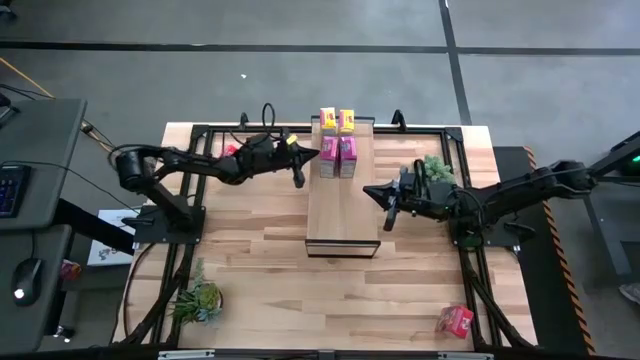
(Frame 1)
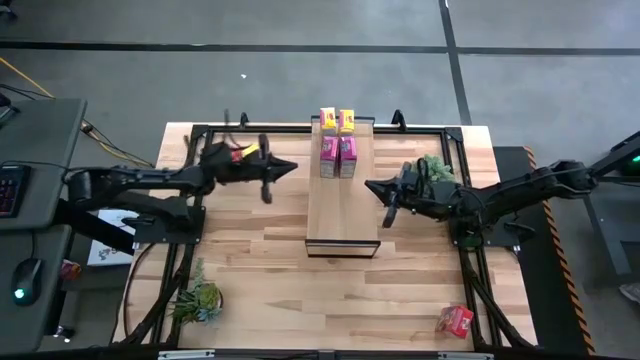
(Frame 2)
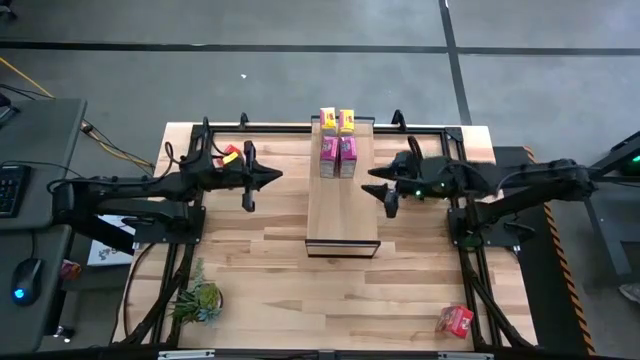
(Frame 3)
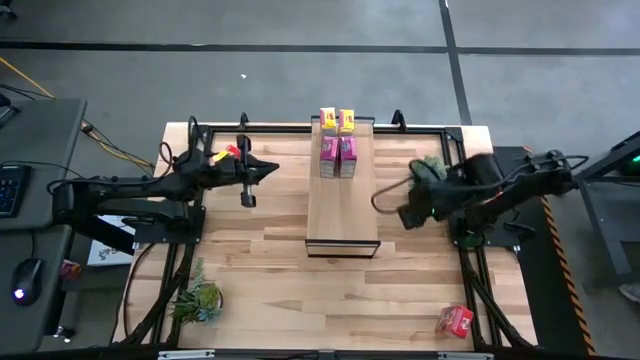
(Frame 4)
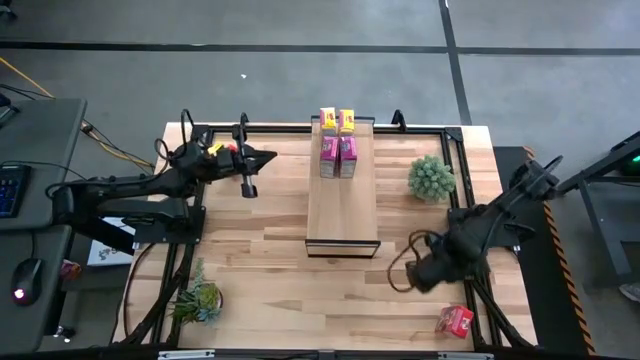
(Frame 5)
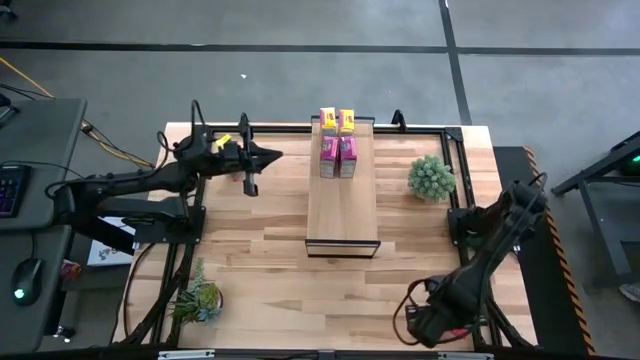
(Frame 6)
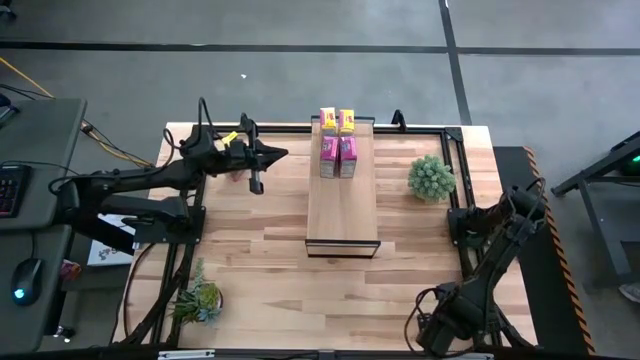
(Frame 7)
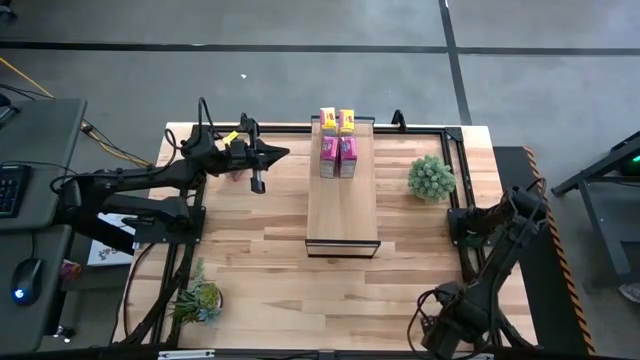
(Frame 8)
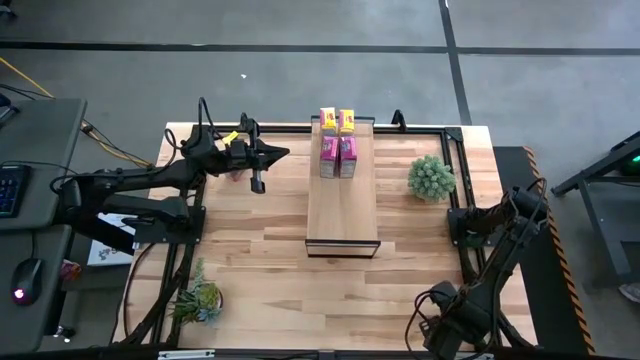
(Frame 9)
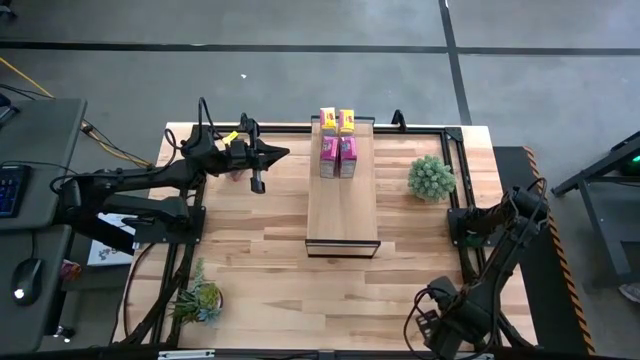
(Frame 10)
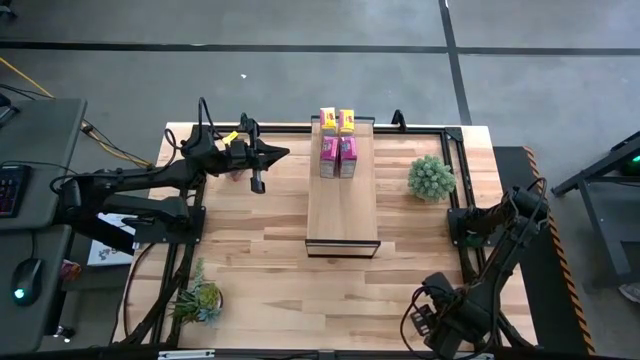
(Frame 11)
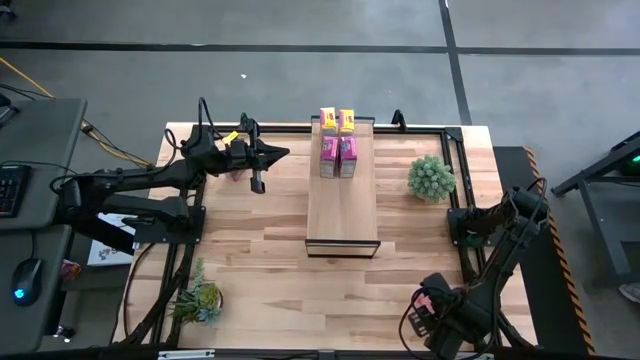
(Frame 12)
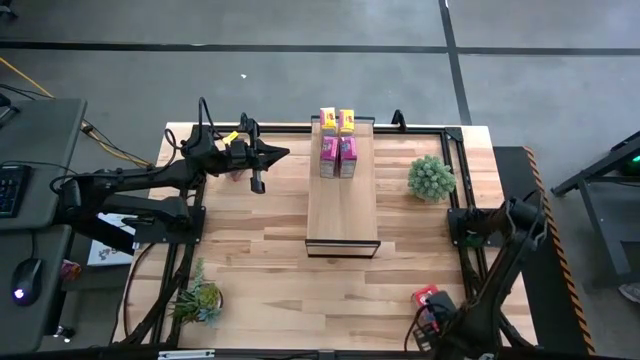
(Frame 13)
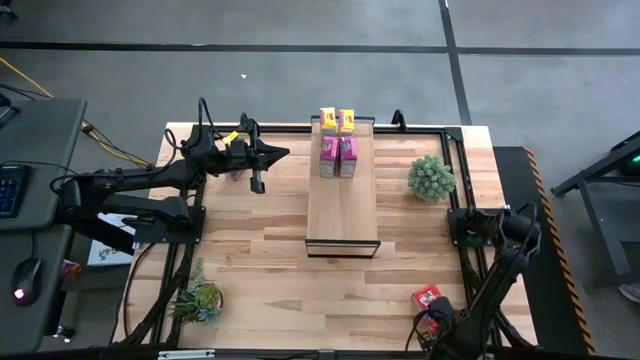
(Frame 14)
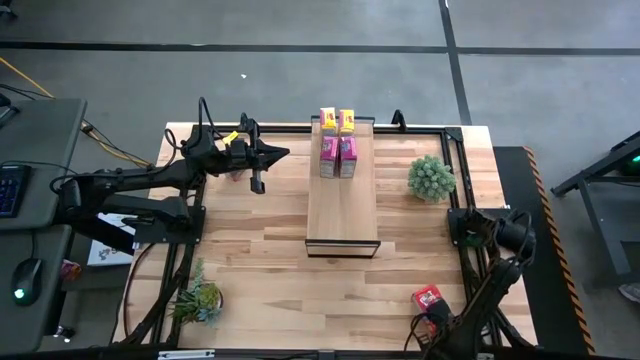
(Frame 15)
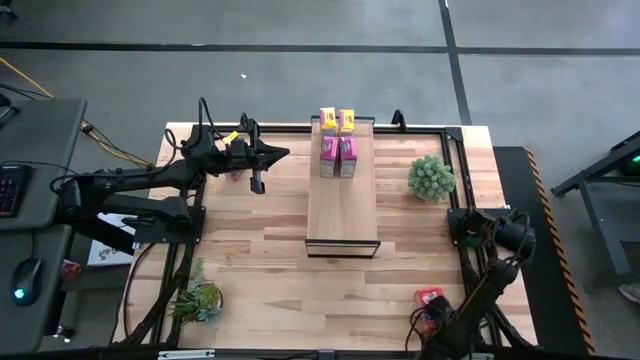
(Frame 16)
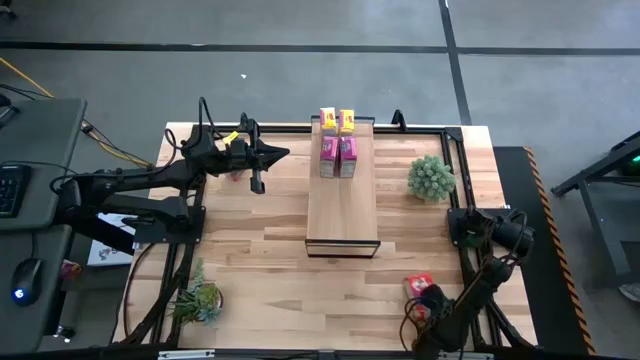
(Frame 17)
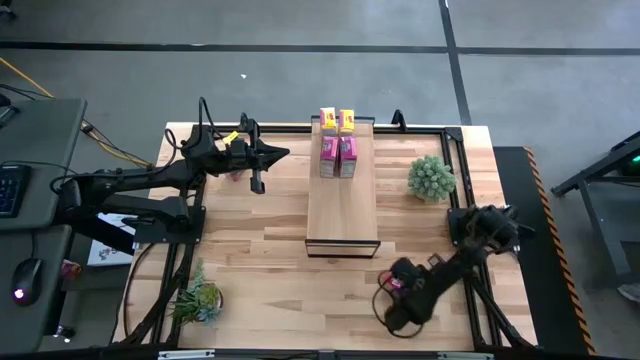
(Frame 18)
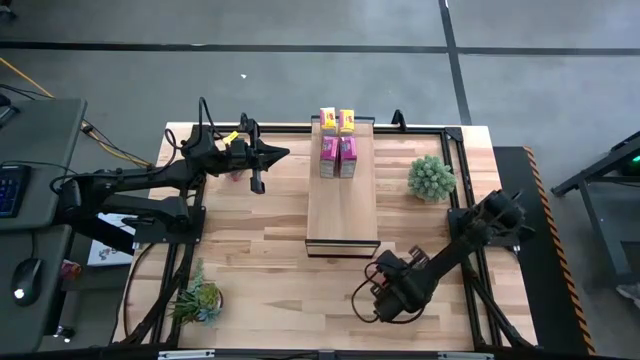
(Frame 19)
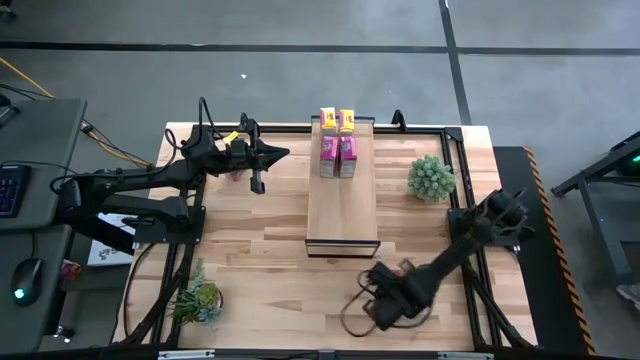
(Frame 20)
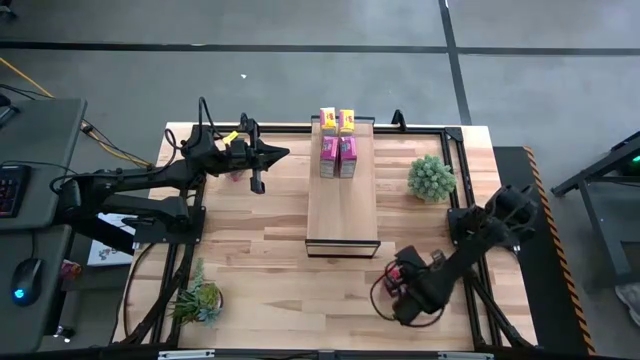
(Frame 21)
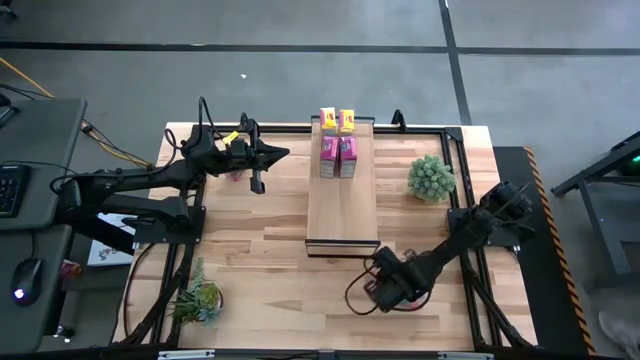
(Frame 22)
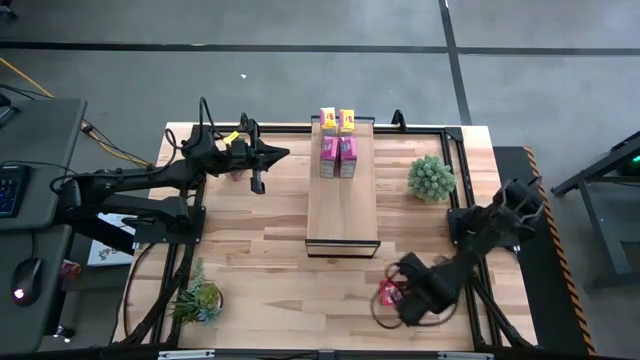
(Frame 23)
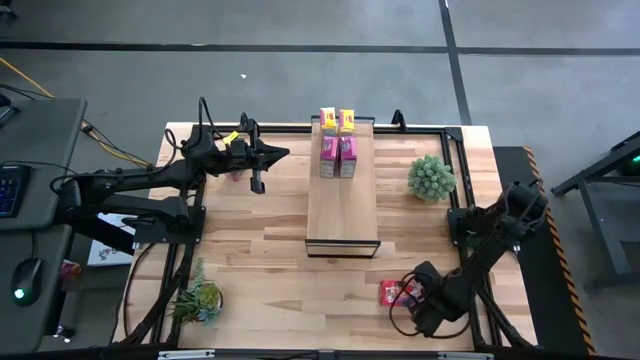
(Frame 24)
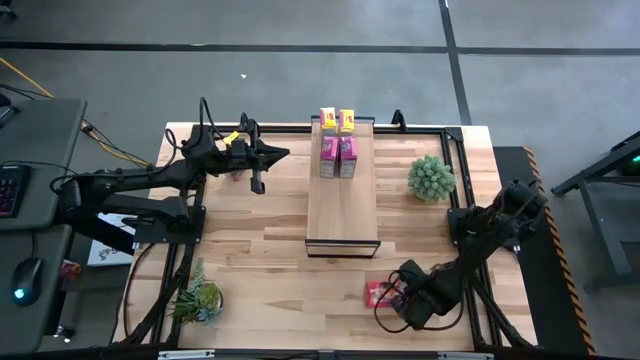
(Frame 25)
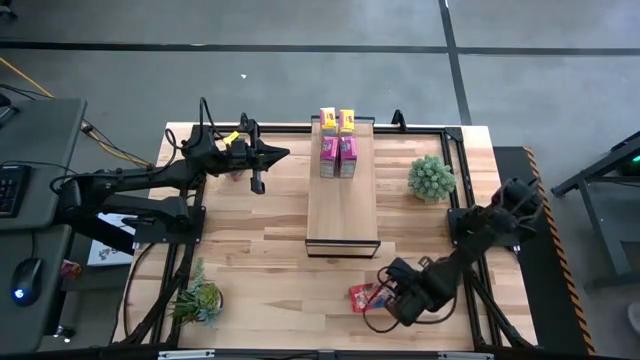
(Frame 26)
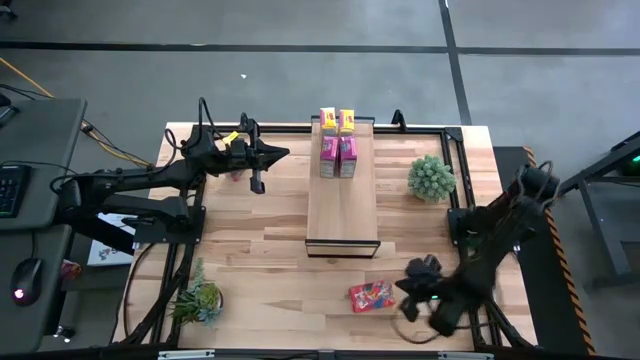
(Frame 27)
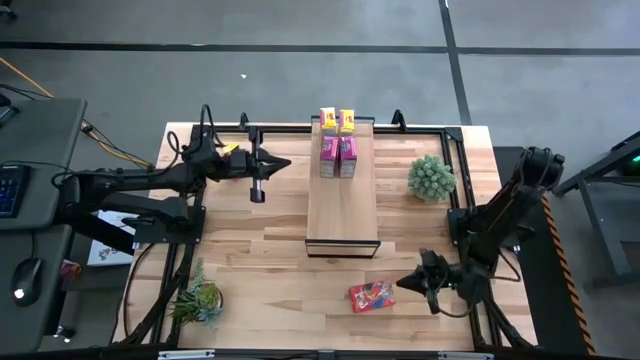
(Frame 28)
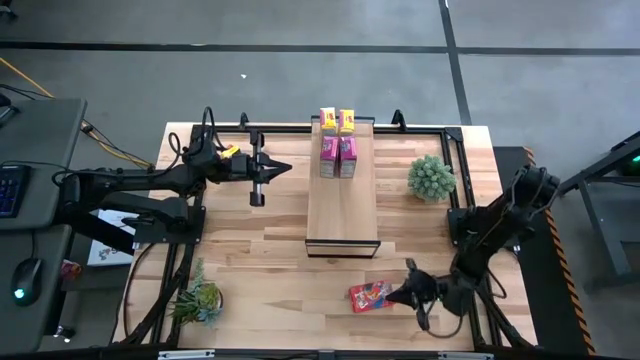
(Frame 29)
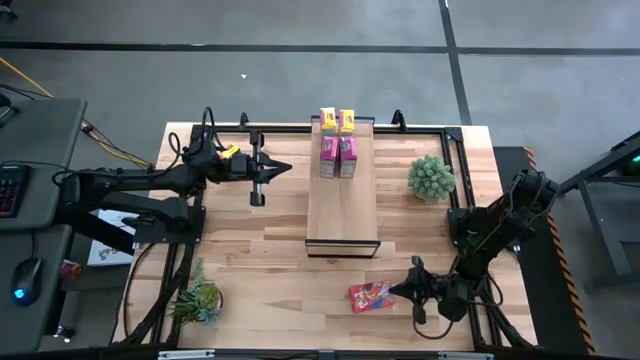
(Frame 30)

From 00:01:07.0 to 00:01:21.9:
Task: Stack cereal on shelf
Put the bottom red cereal box on the shelf

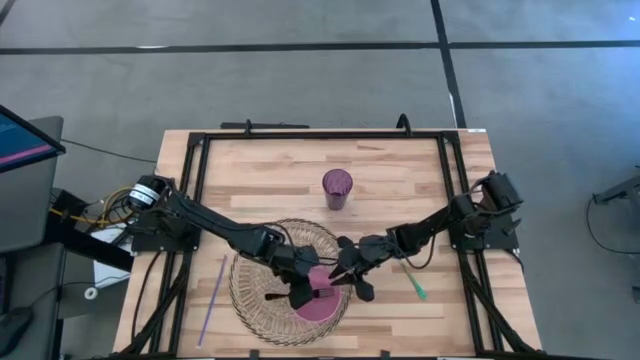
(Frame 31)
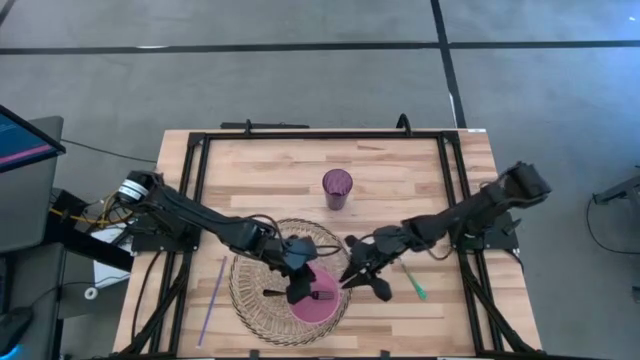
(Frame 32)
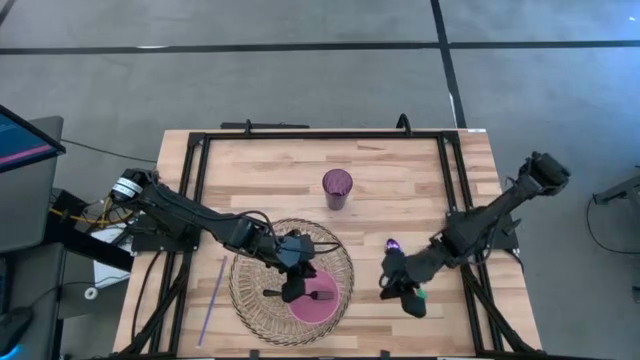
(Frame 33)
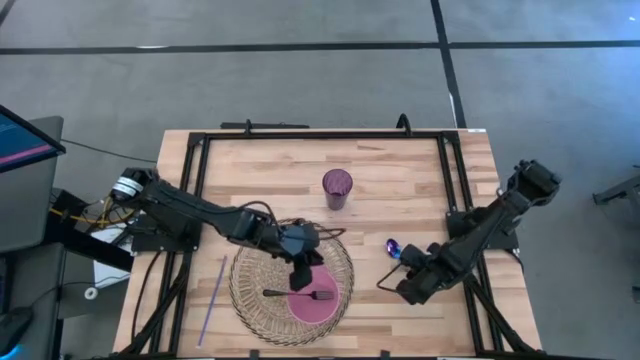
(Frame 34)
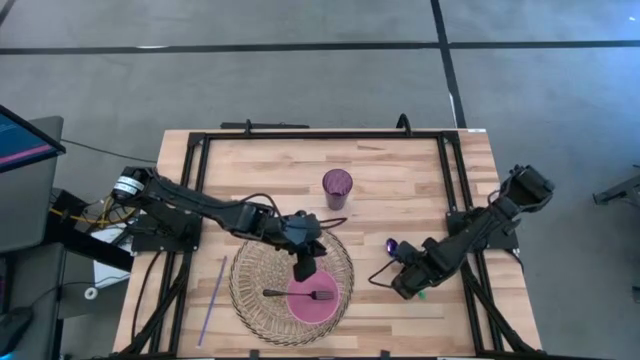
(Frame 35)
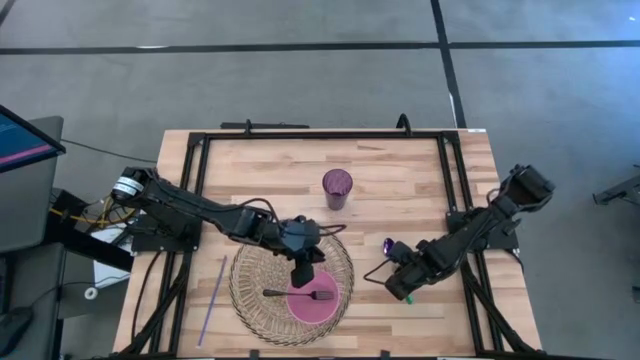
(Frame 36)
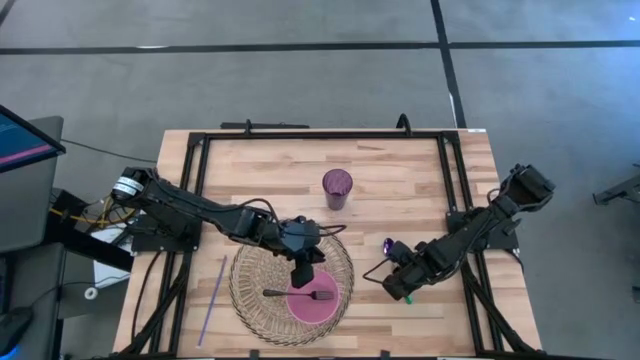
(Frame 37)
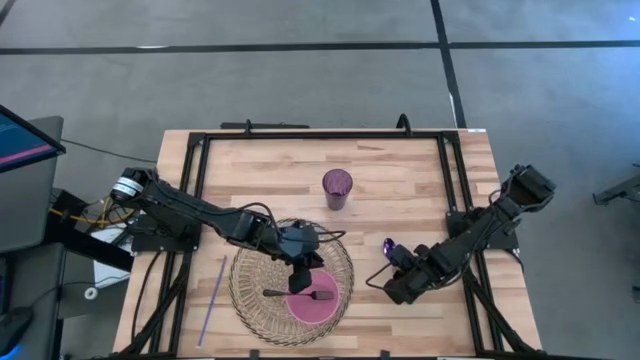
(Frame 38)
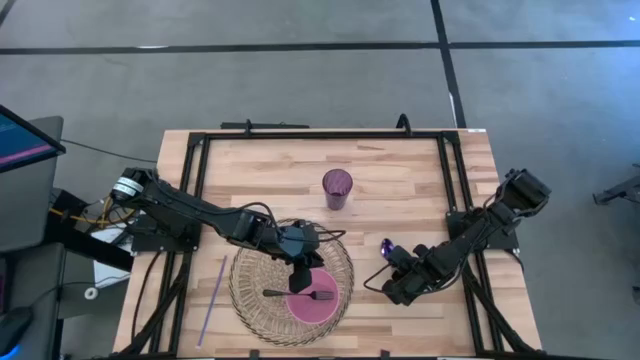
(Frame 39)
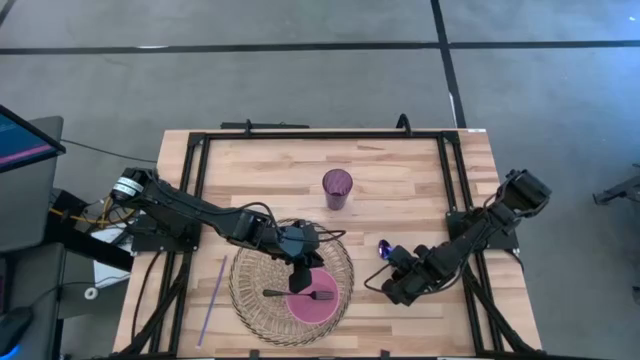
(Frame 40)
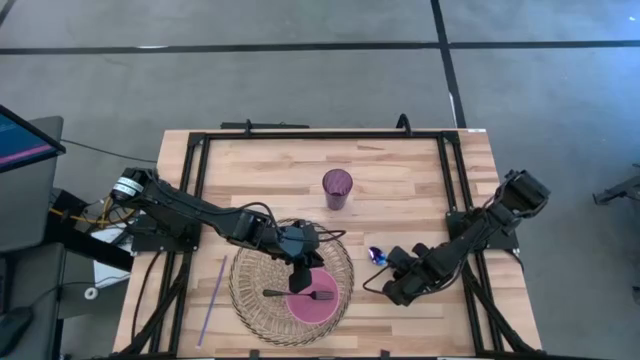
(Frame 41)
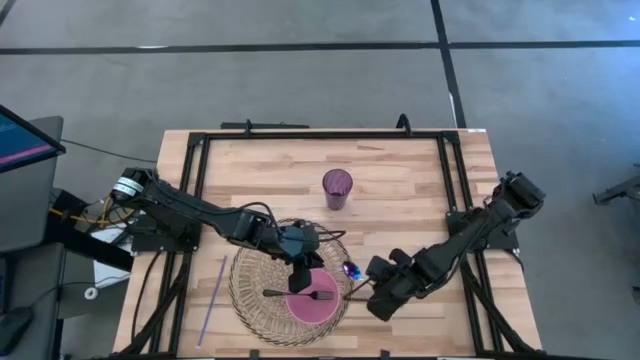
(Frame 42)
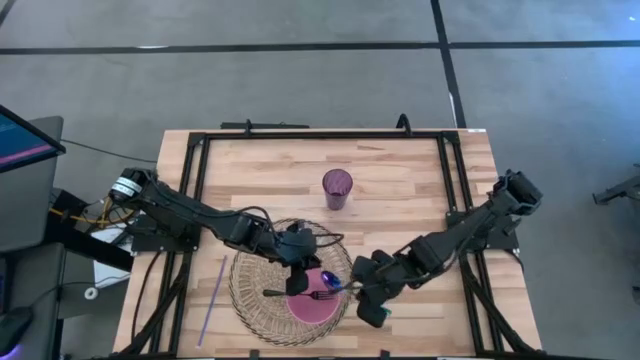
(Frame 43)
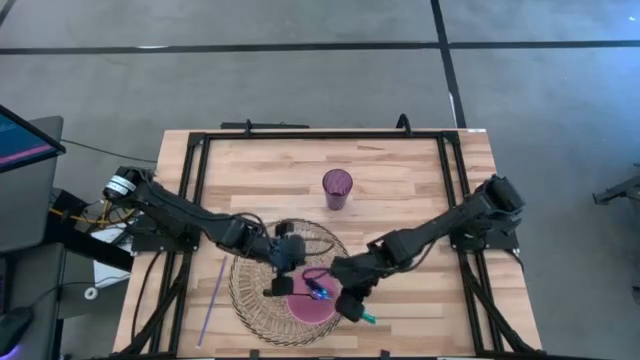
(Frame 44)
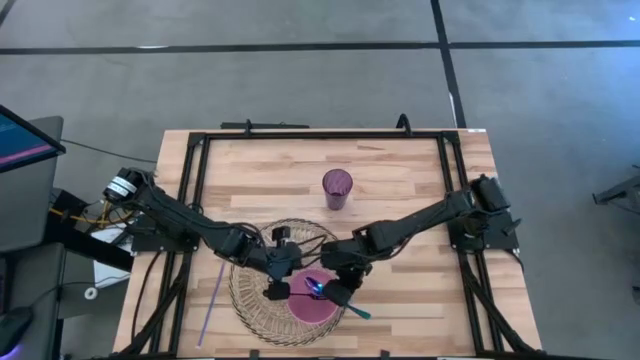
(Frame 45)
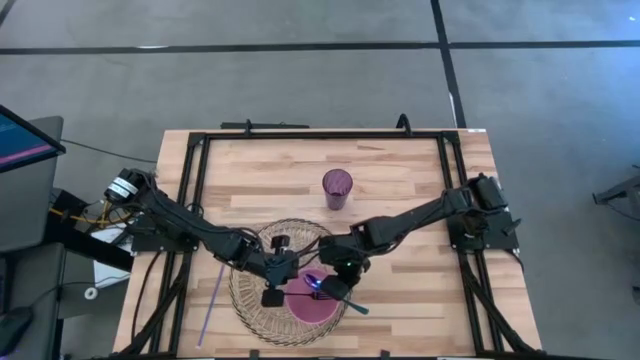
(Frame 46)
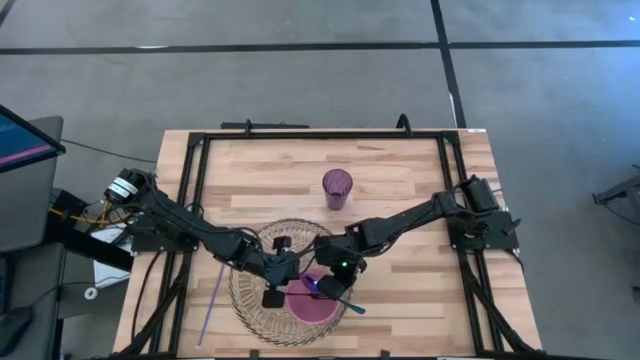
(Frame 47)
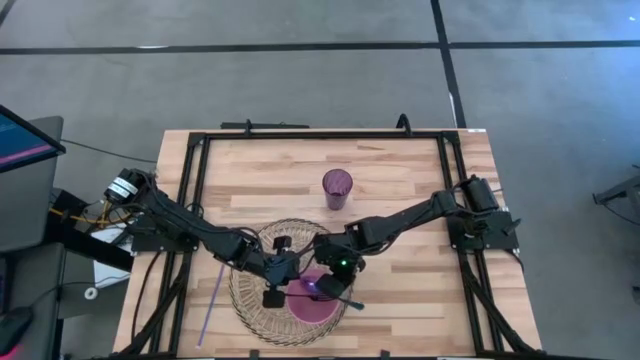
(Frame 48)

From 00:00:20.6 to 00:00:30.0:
Task: Pick & Place Utensil
Put the blue spoon into the pink bowl
